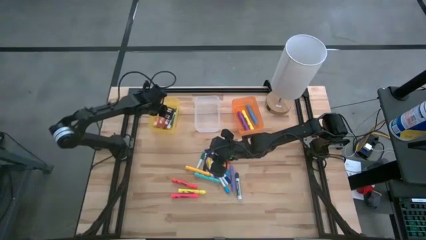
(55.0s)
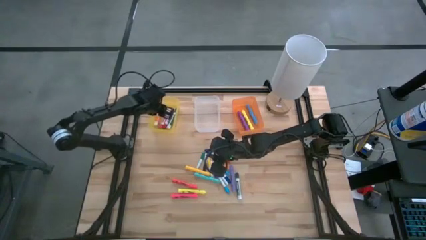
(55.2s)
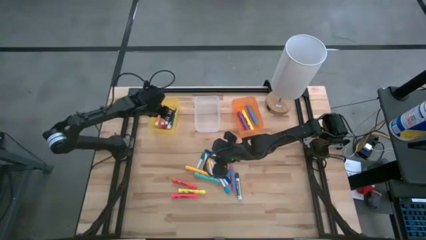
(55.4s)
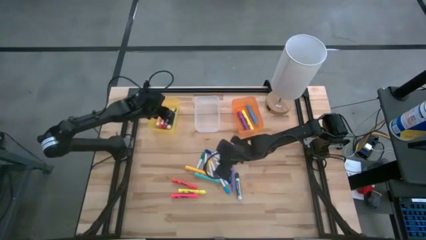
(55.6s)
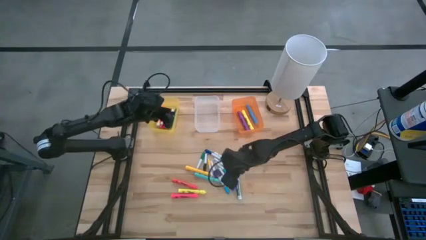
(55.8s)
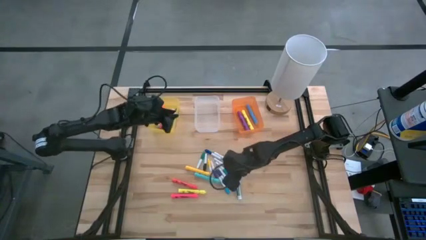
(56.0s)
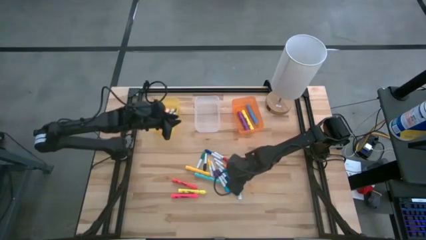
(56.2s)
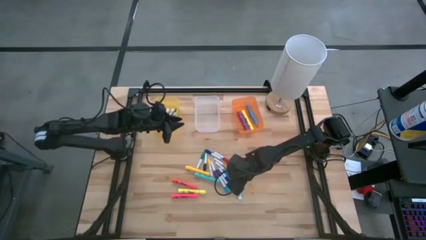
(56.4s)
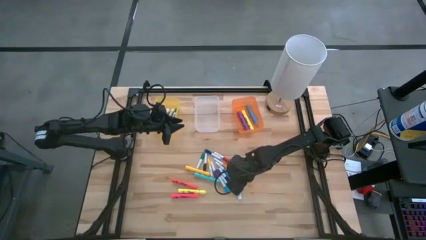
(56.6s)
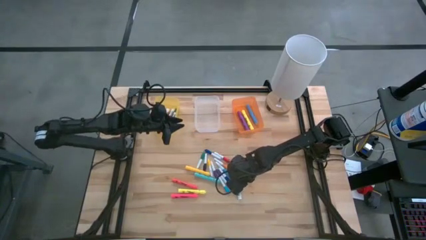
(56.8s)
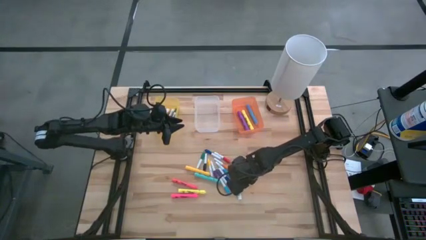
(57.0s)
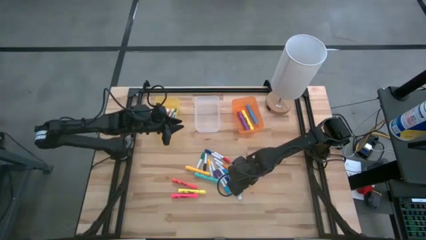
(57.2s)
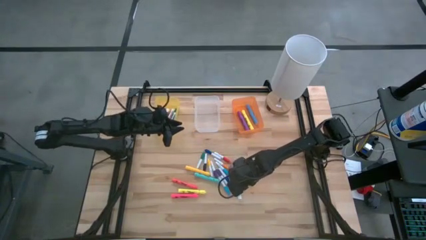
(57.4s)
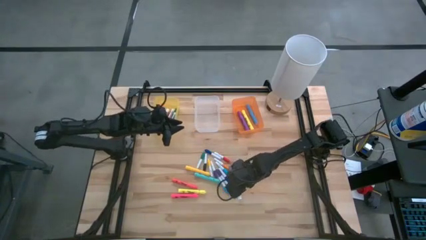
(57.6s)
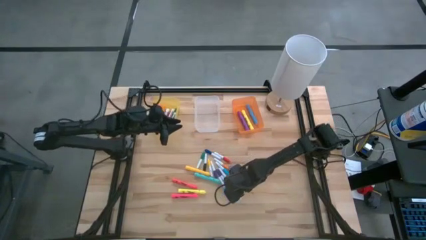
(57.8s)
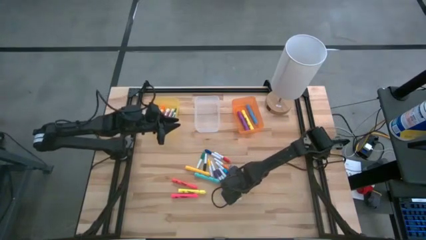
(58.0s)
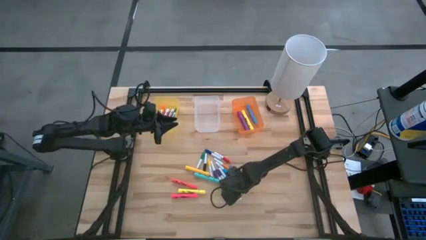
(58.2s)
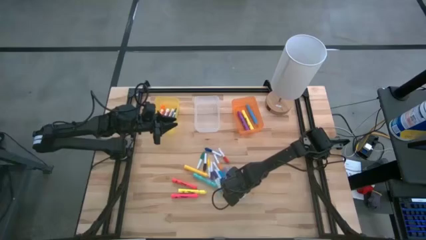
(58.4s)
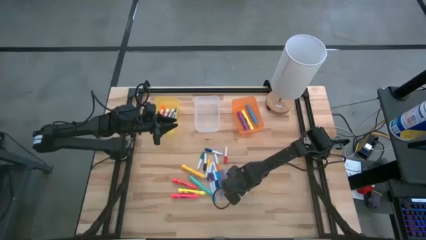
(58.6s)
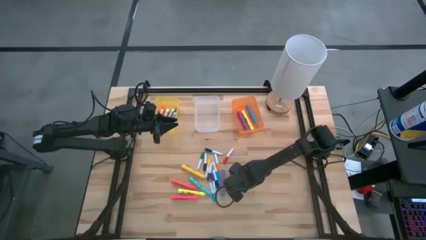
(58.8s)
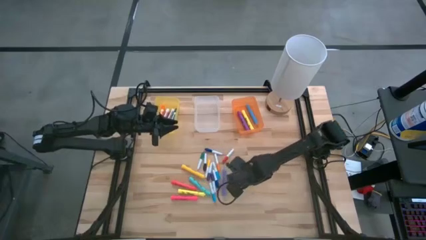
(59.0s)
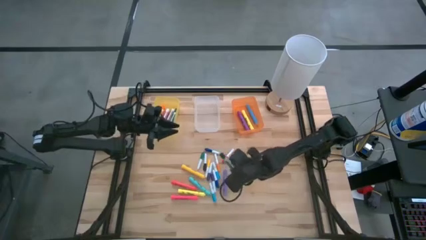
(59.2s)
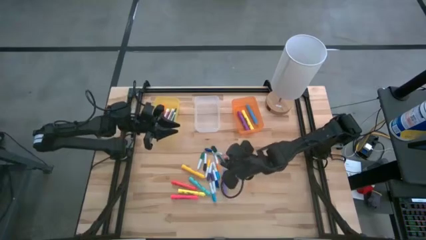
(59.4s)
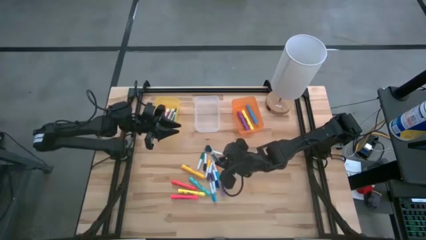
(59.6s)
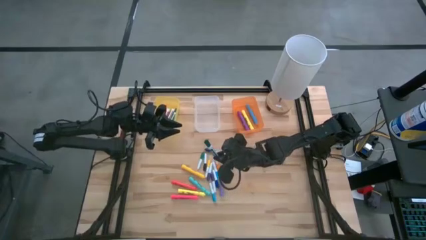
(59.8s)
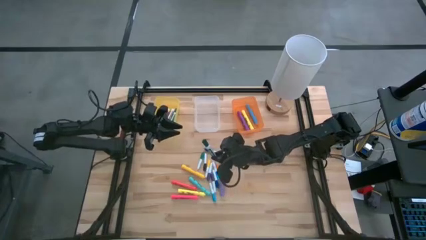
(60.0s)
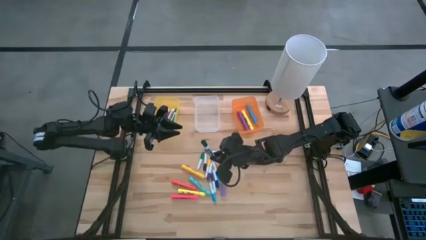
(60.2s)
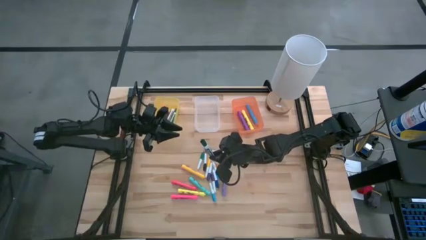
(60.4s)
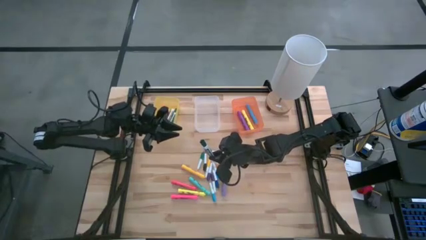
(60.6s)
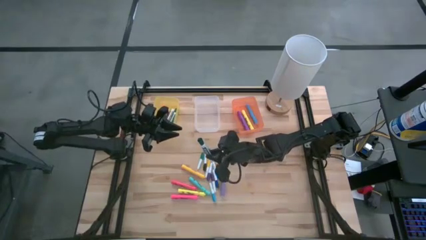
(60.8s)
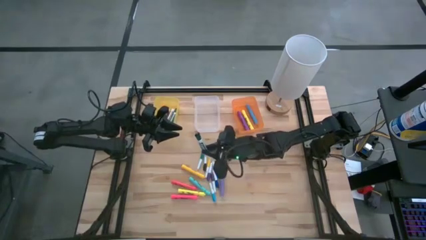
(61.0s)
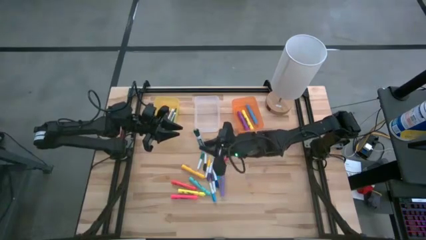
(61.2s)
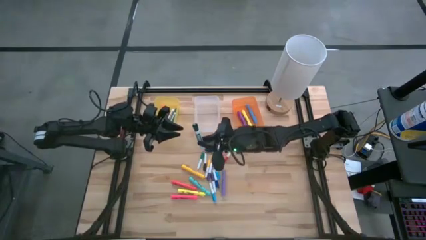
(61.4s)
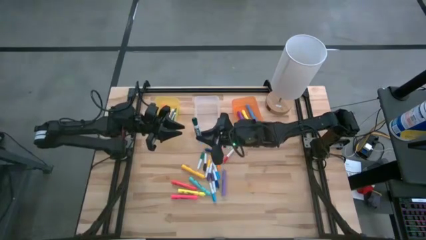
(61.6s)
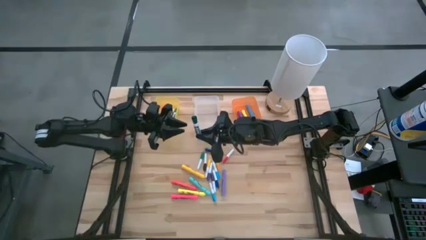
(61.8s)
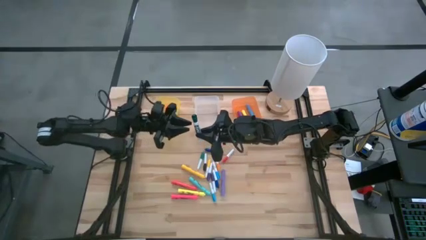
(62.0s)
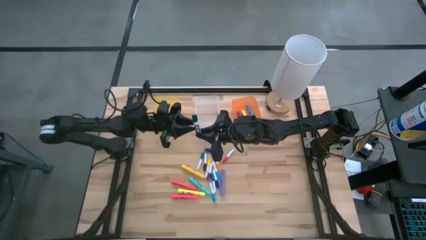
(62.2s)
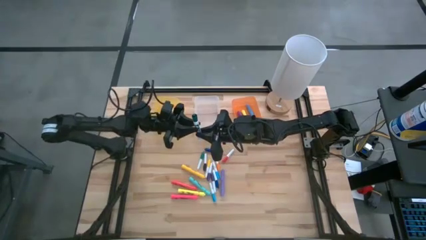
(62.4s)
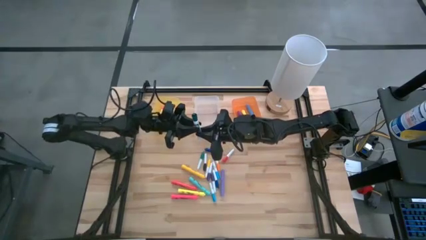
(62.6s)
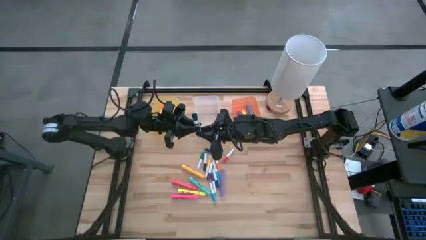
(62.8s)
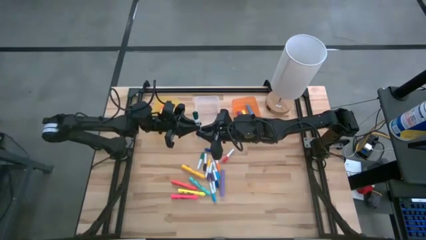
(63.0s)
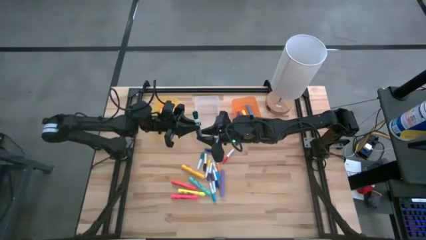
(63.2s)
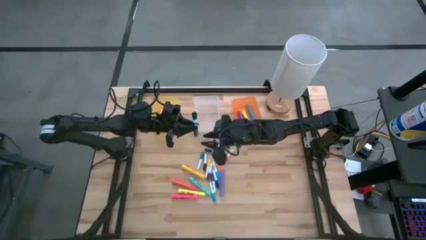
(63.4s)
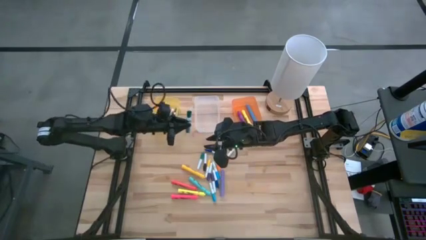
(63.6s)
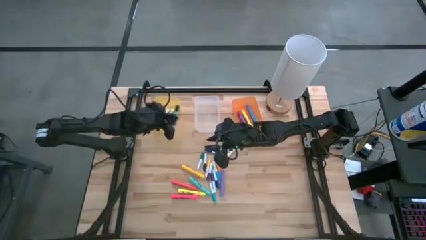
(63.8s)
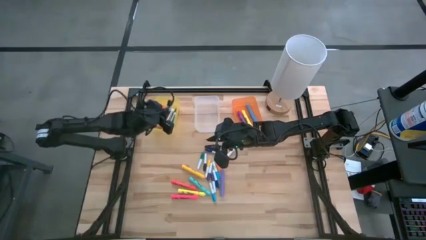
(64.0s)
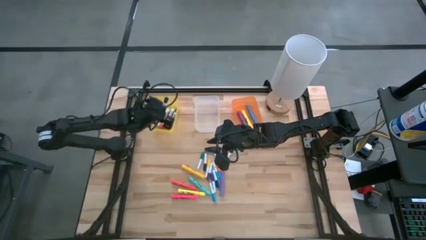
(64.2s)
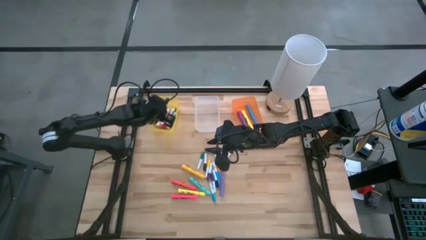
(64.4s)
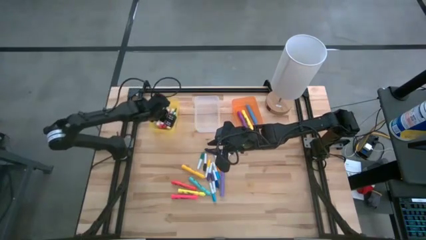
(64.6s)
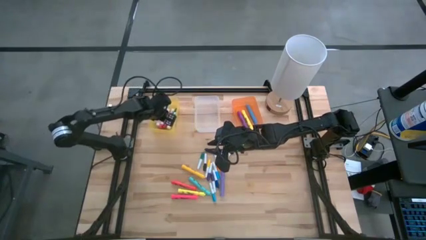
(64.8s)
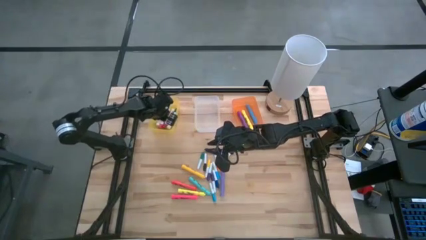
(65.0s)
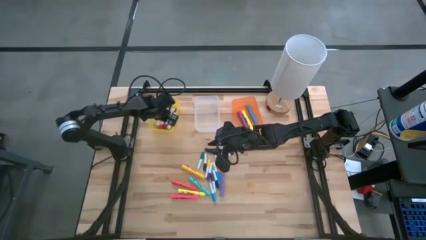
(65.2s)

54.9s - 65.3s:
Task: Pick & Place Markers
Put the dark green marker pen into the yellow bin

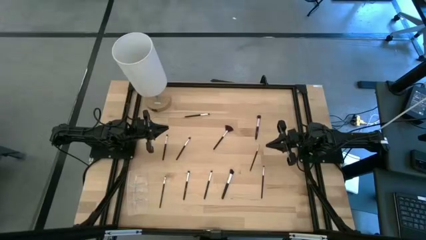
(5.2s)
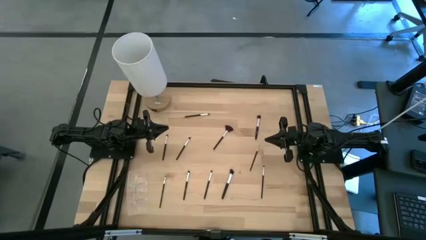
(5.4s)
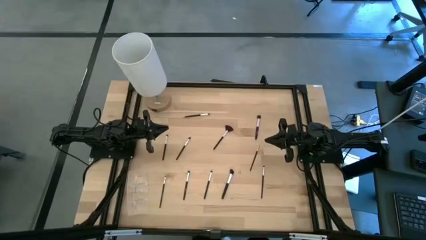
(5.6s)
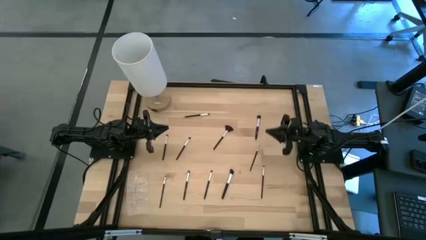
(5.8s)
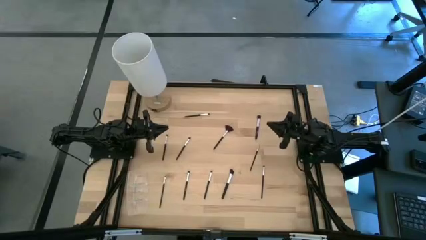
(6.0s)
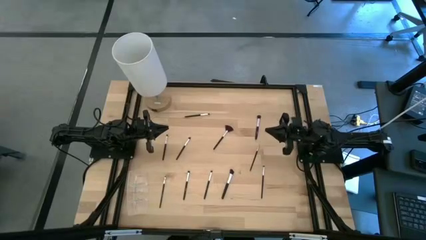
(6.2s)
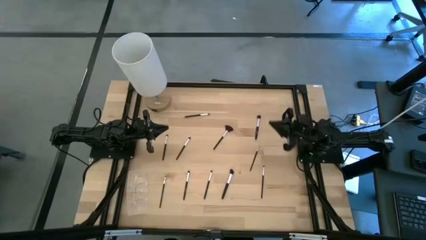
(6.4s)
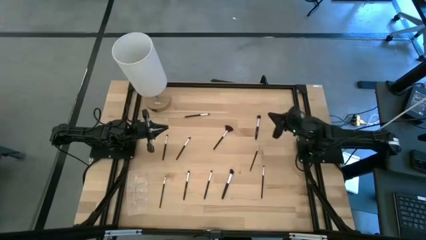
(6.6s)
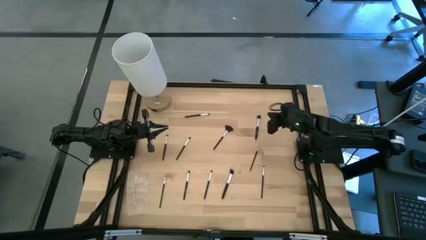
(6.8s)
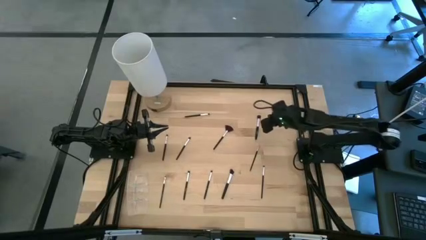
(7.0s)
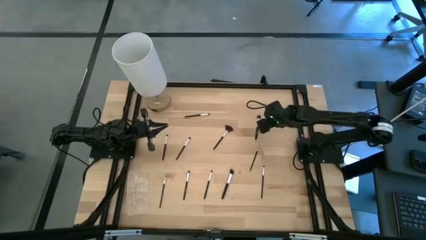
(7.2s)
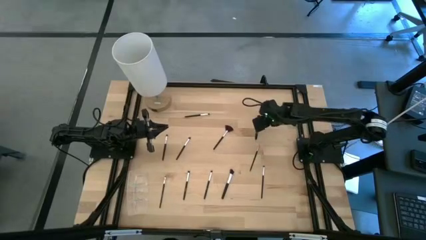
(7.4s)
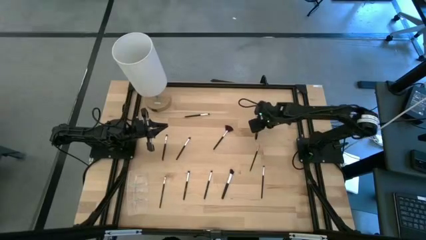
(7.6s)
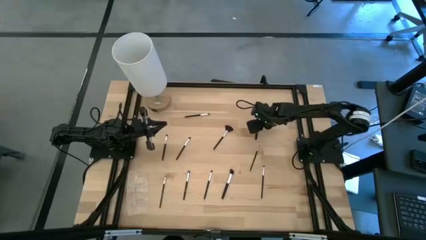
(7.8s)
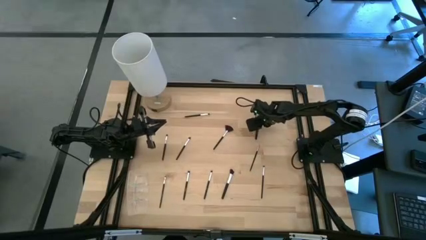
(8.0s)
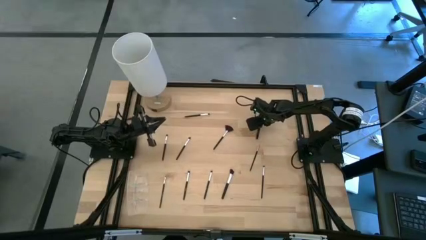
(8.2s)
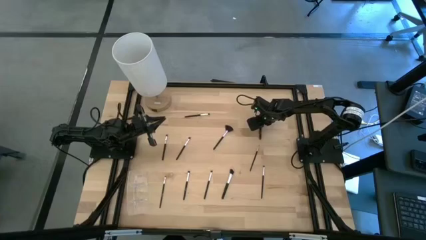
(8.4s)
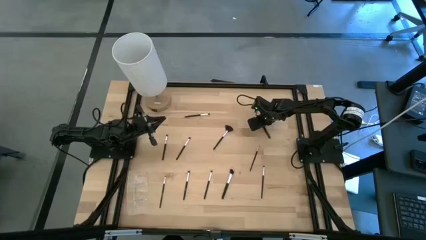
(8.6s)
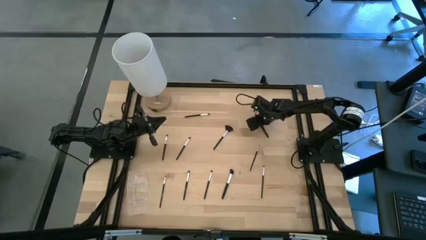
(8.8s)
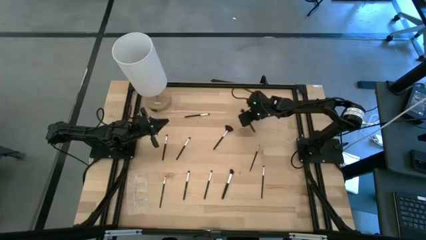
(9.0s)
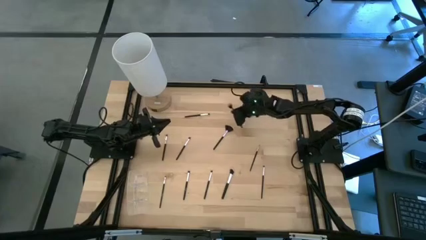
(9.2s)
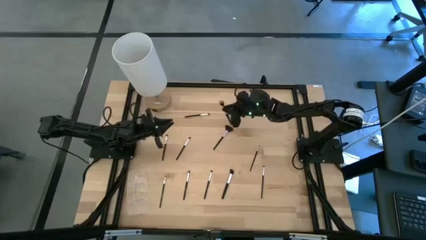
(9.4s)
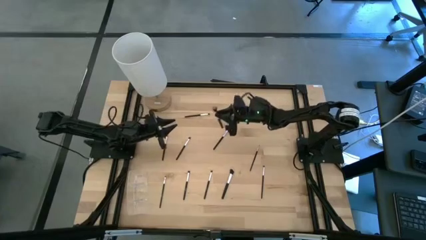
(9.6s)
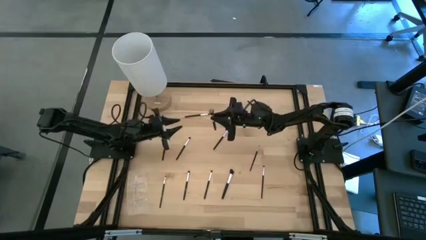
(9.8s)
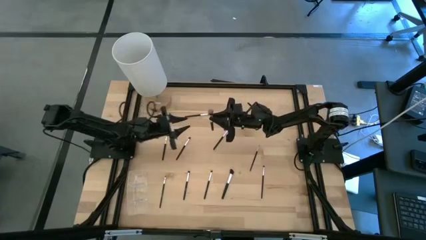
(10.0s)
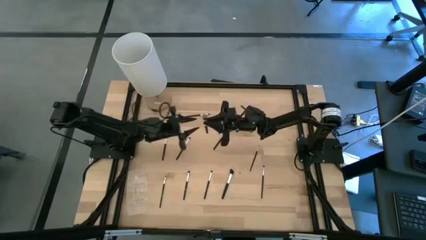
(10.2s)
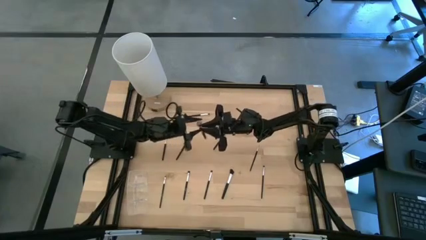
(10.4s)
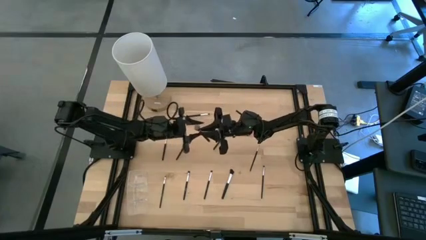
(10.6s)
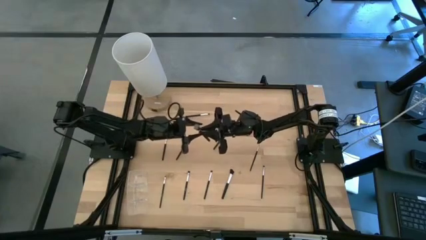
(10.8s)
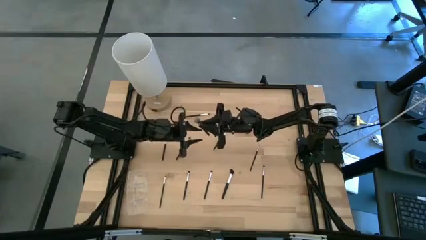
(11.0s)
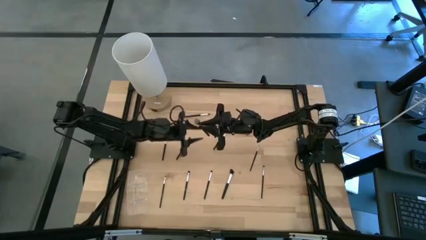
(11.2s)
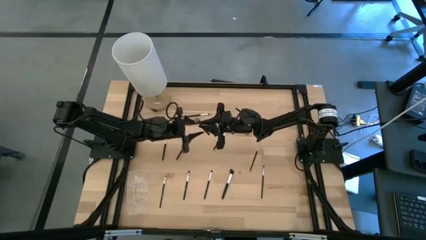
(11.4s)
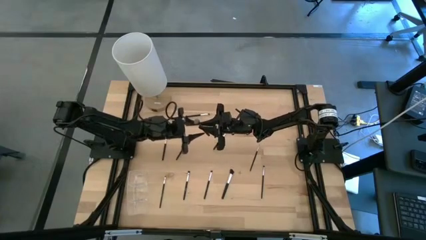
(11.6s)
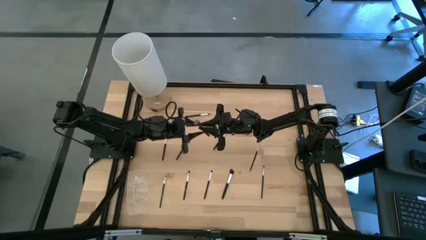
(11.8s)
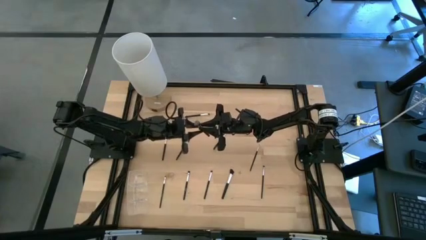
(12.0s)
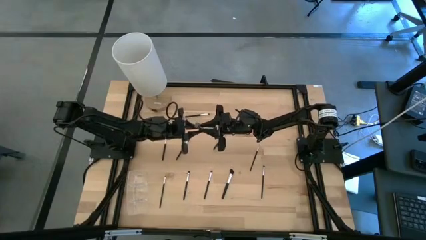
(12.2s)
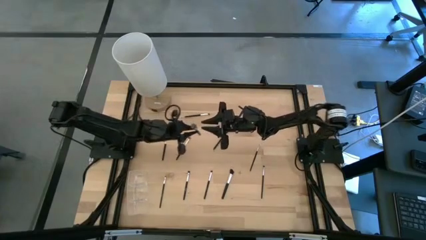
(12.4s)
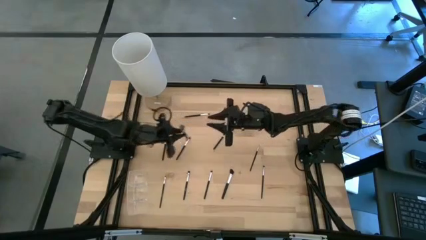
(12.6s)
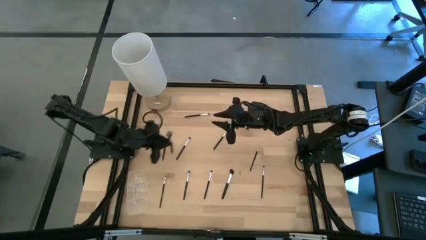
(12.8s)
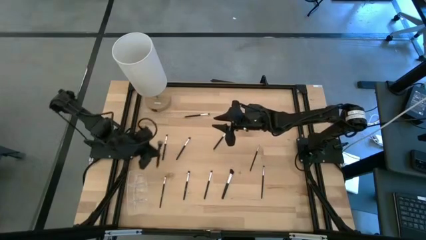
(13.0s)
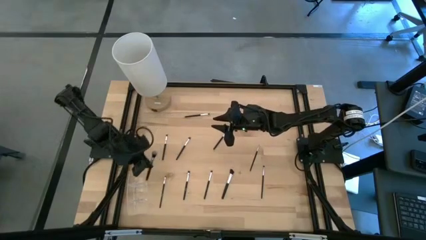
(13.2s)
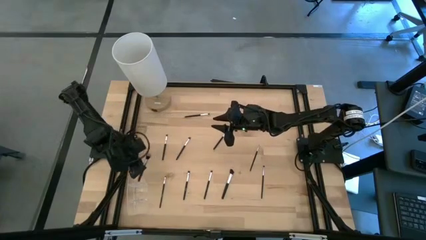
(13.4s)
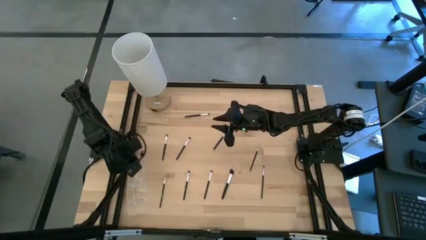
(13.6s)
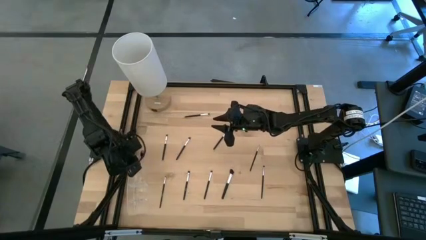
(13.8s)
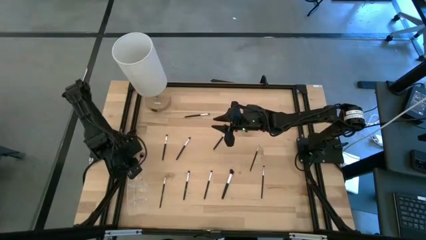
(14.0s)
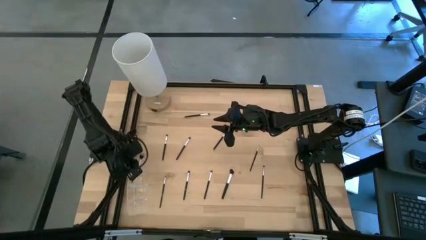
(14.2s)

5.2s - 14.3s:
Task: Pick & Place Makeup Supplies
Put the makeup brush into the transparent organizer
